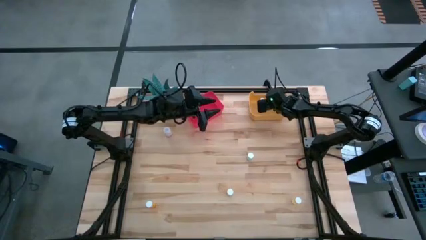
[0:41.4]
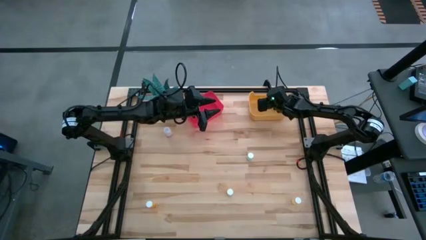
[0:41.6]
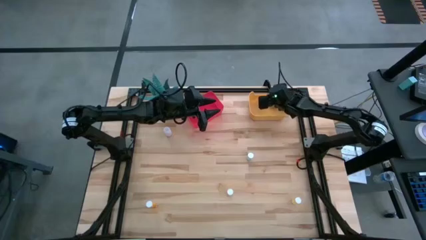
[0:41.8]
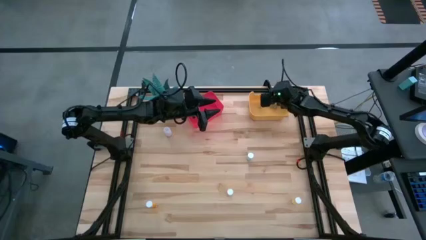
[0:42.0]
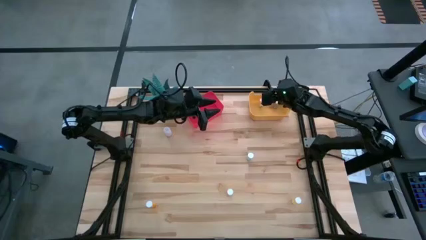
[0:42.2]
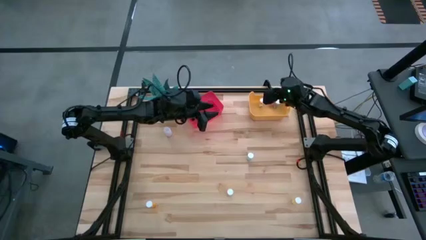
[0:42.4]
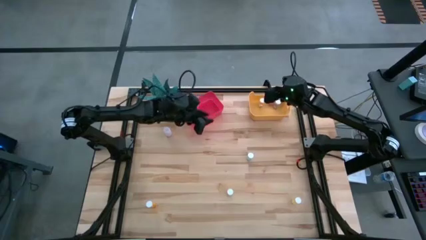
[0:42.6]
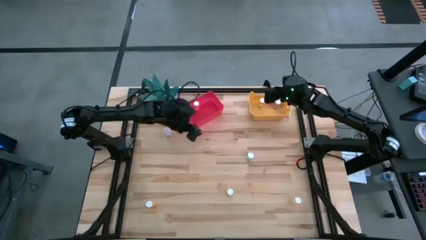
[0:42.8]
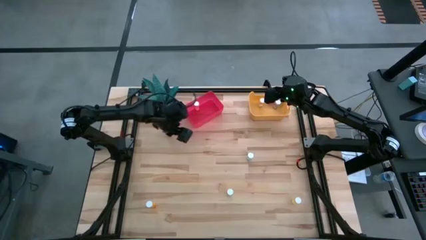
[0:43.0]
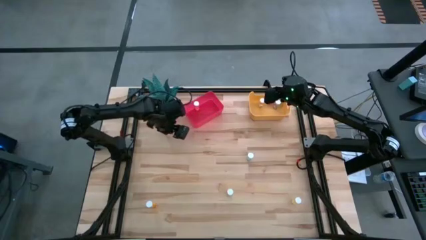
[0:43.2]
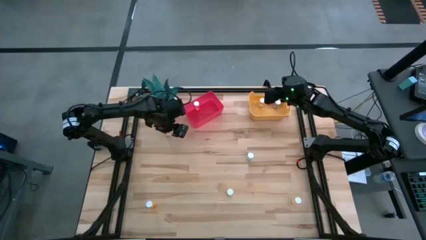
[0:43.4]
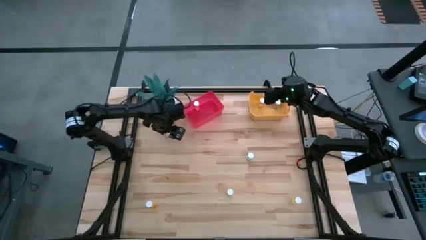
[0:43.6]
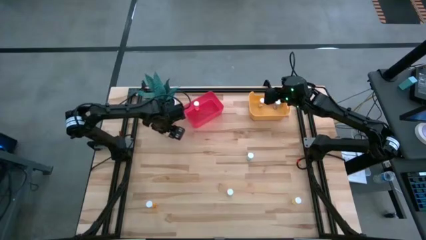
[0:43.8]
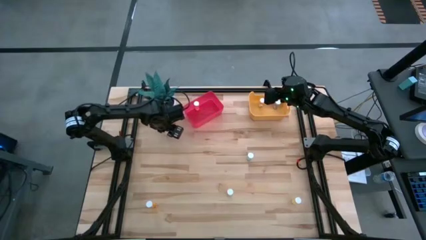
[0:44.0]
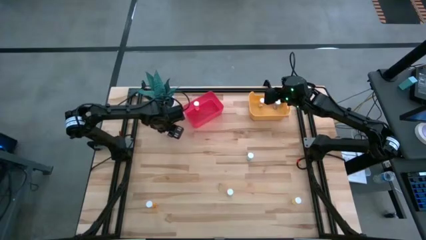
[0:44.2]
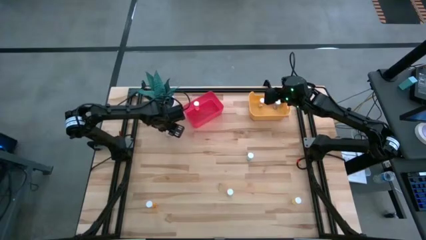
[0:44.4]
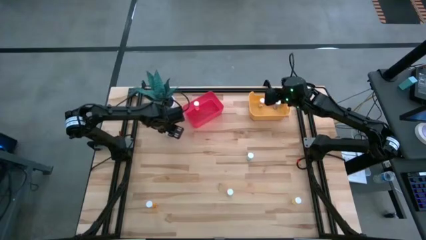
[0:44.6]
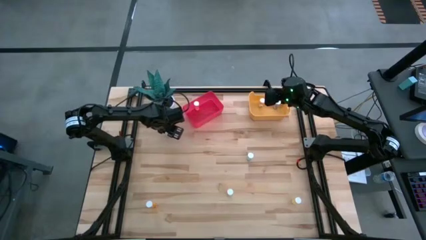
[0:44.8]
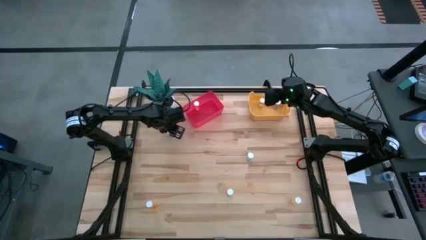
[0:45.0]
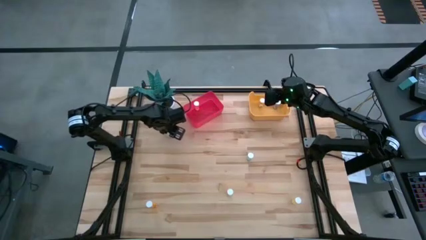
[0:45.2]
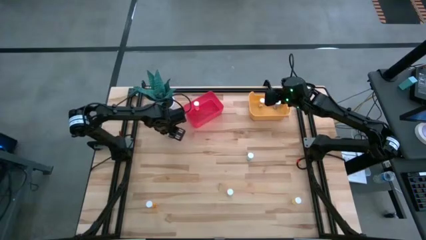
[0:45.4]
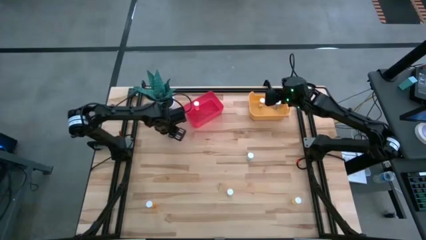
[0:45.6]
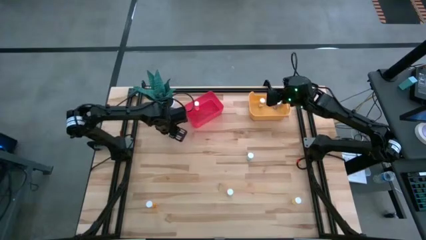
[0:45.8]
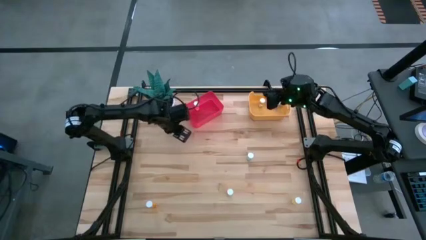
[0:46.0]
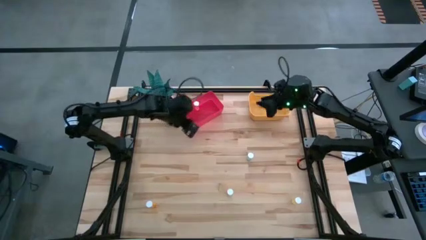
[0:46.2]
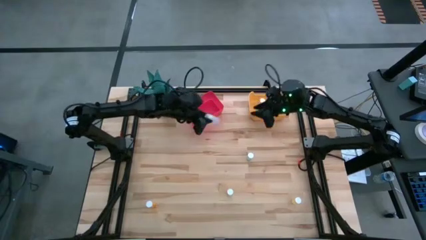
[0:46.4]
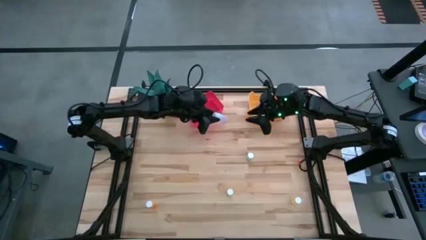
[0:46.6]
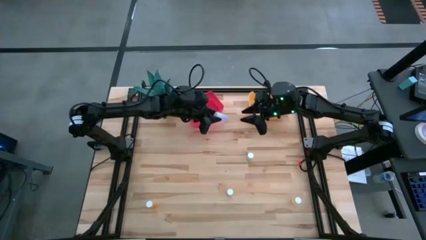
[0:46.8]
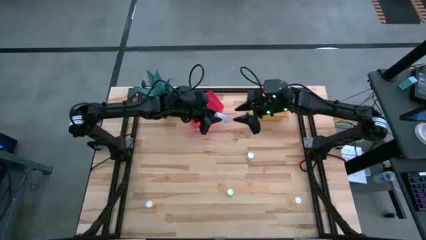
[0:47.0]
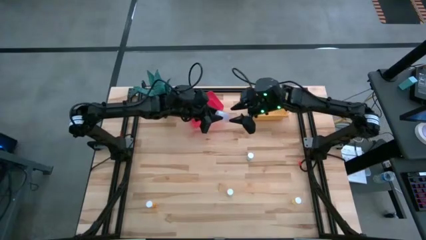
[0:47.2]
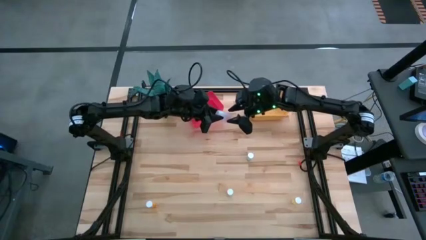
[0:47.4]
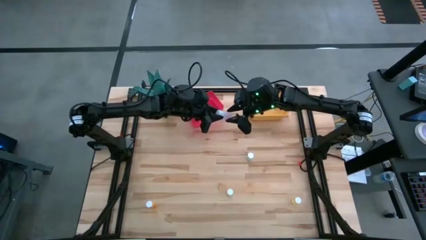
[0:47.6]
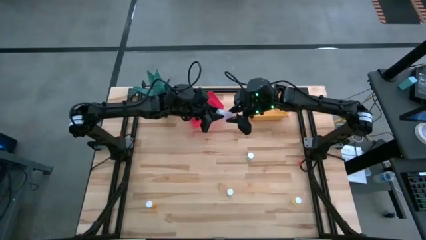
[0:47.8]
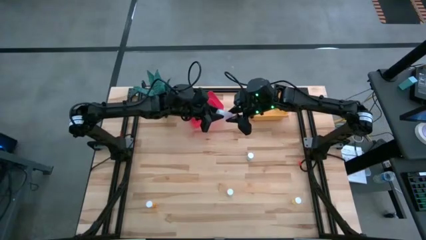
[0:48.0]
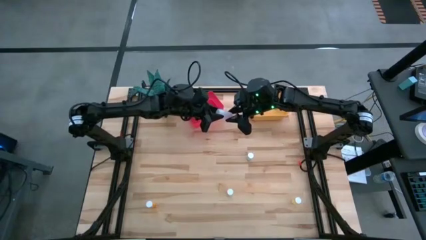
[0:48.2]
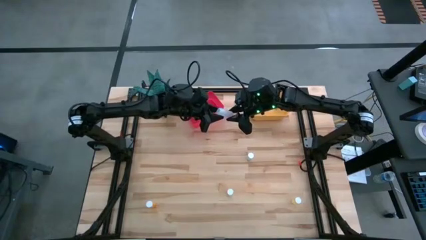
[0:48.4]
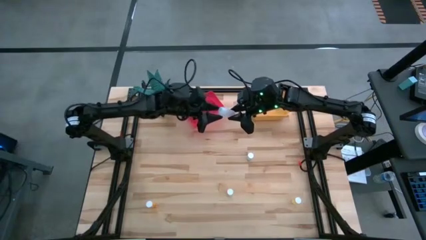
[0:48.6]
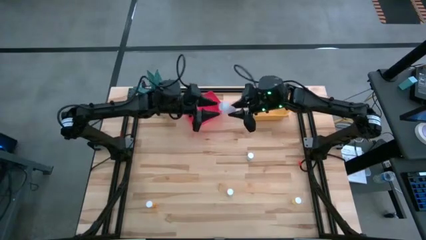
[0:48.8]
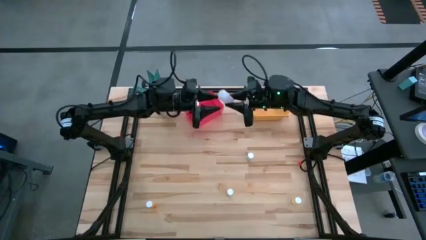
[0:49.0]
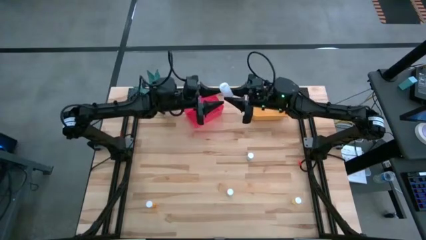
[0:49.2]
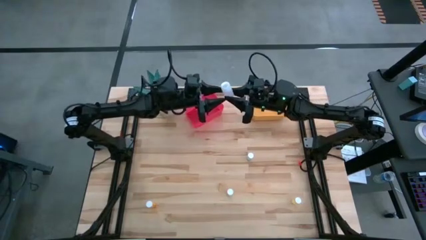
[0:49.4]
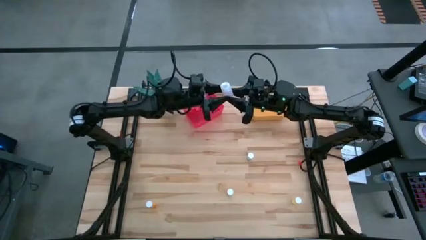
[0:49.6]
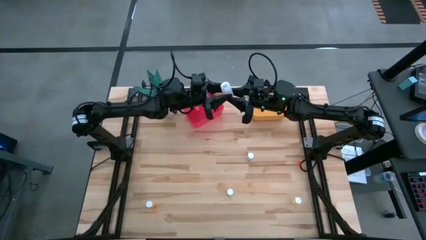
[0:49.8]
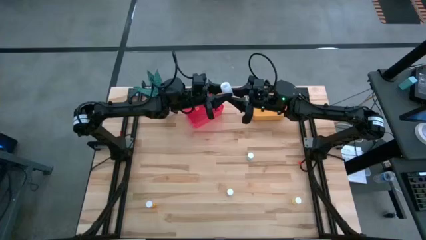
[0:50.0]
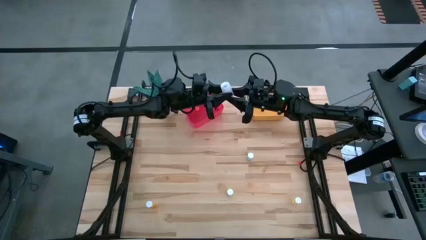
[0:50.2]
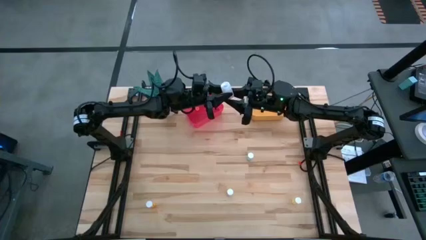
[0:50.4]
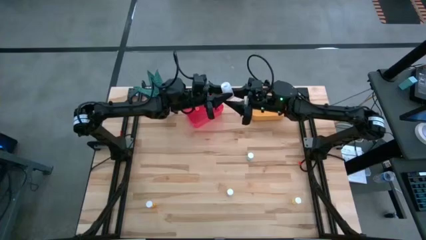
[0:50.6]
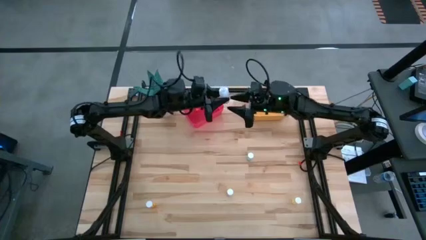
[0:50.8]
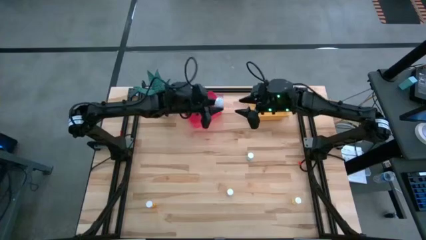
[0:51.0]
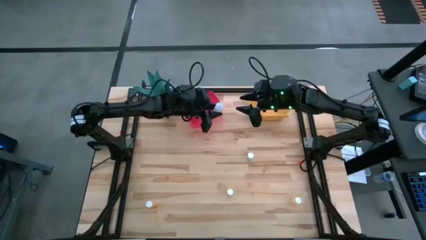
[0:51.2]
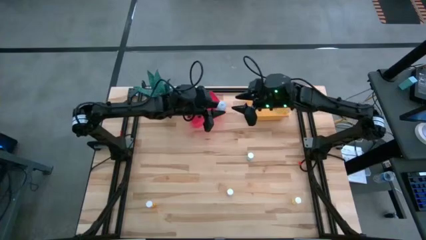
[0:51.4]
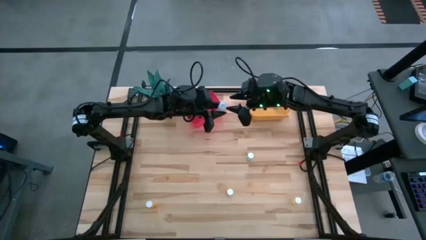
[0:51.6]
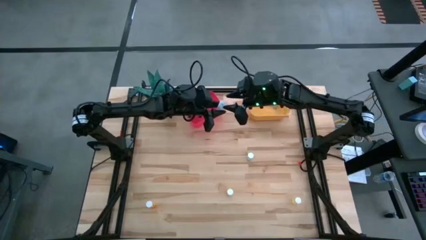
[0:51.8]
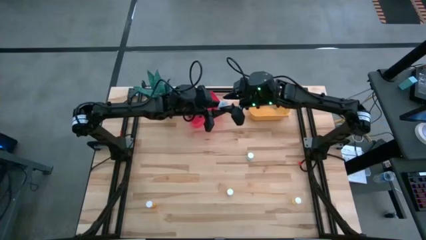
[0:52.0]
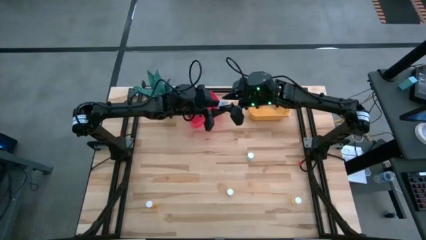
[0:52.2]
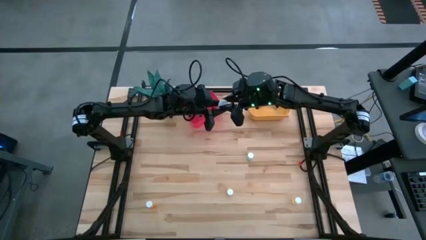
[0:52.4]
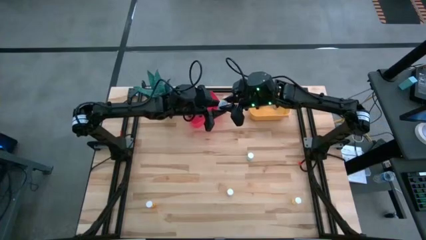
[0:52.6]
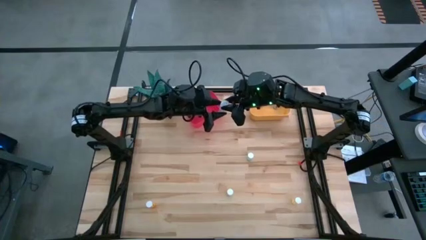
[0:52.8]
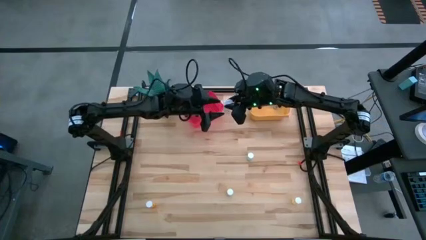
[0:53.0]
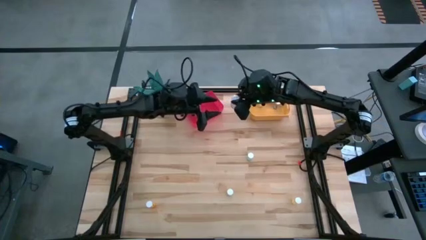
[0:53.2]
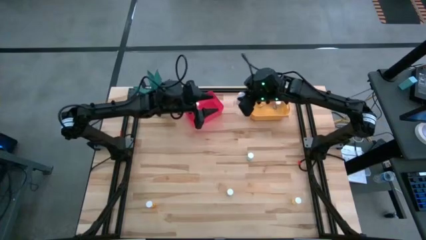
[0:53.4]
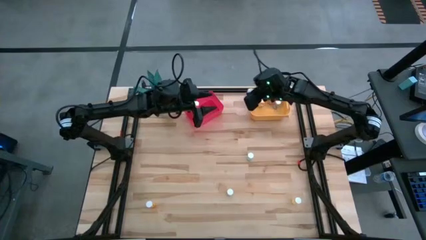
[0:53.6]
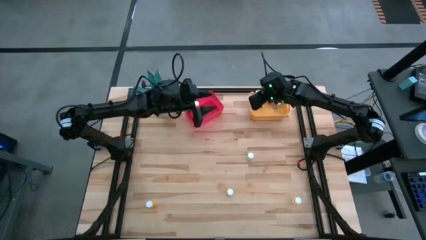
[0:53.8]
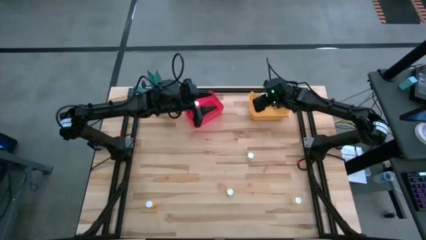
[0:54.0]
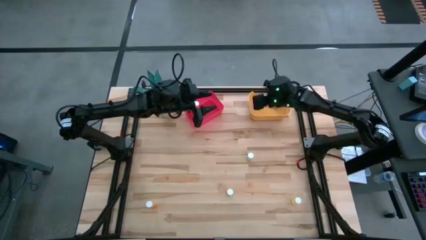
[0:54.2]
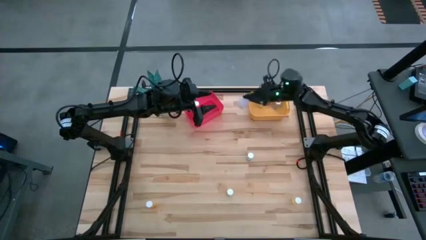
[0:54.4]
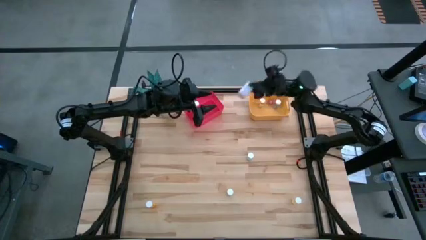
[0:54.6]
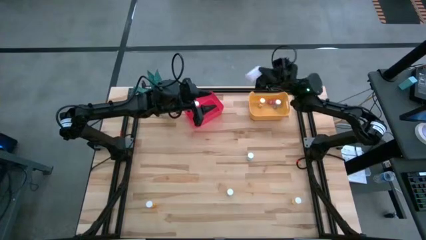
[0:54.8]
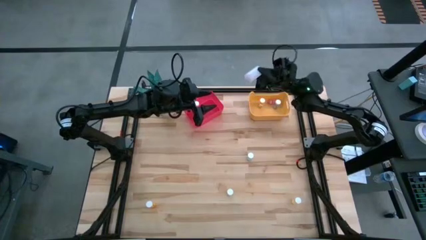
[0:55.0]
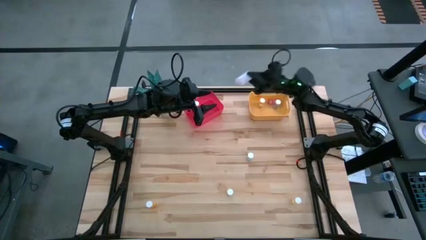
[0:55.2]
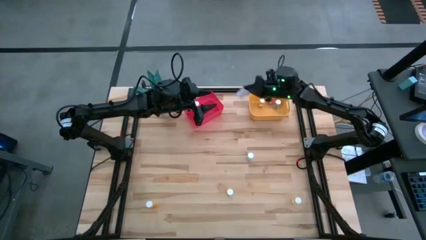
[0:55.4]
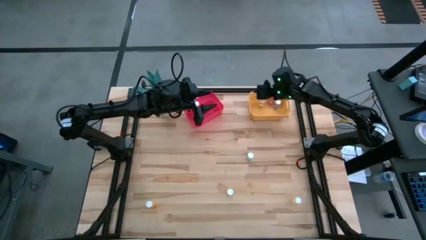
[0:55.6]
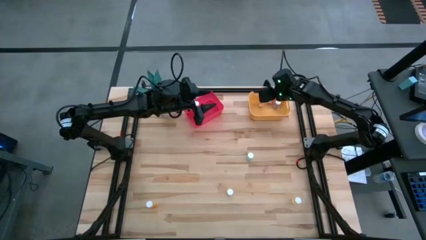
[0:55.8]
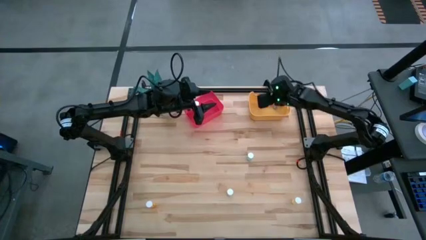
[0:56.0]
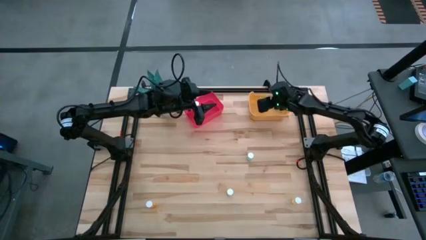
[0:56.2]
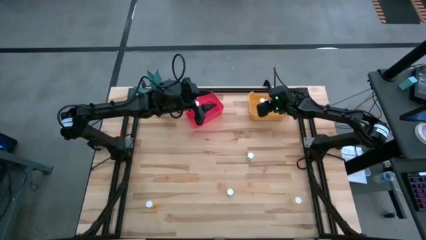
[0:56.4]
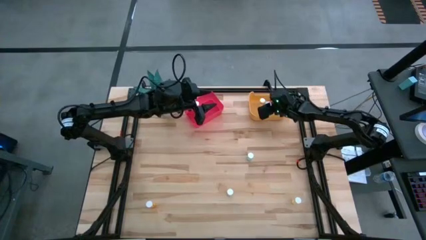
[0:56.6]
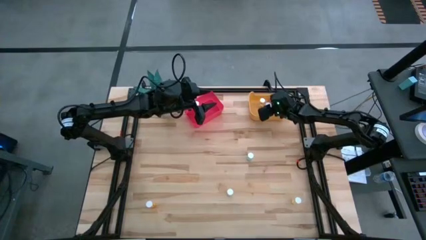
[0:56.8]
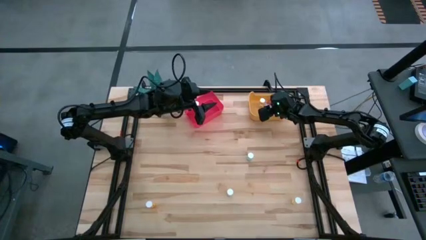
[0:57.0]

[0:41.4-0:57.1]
Task: Pick and place medicine bottles into bin by pill shape (circle, oval)
Put the white capsule bottle into the yellow bin
